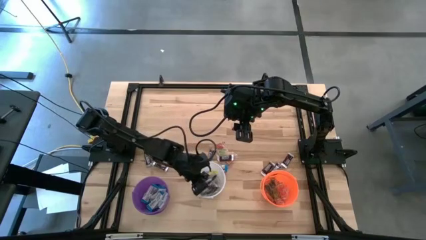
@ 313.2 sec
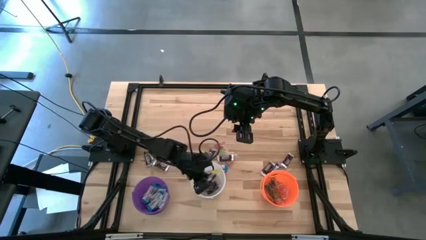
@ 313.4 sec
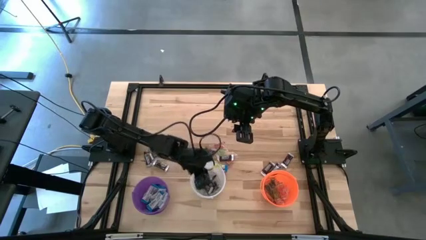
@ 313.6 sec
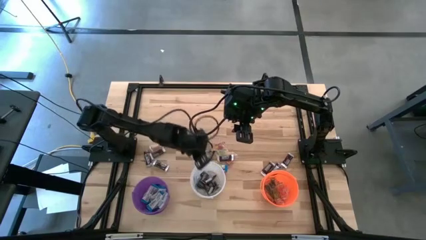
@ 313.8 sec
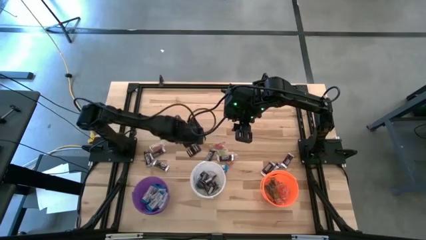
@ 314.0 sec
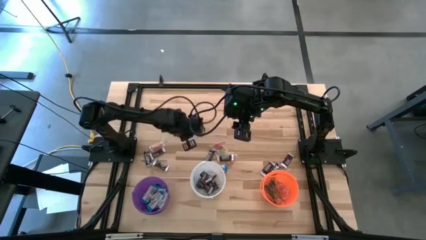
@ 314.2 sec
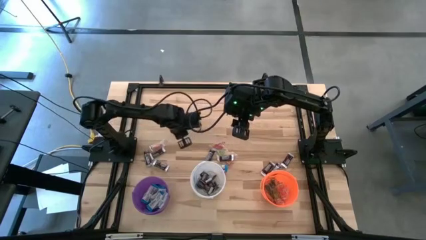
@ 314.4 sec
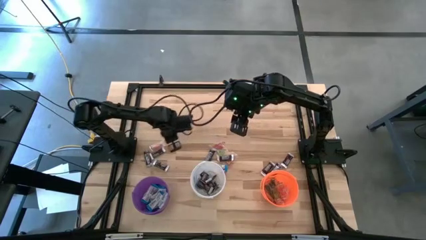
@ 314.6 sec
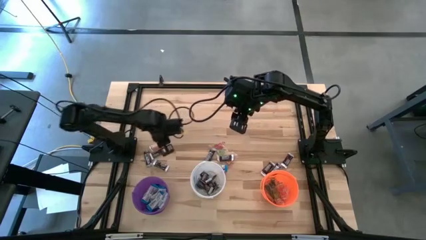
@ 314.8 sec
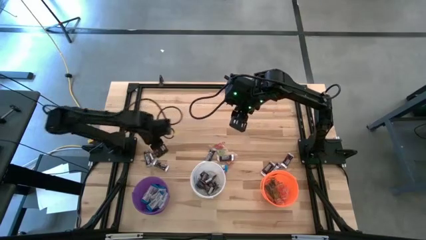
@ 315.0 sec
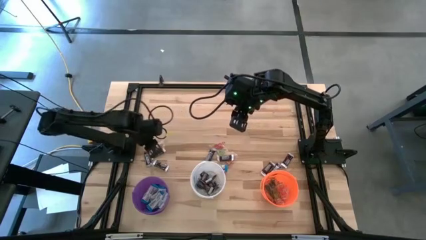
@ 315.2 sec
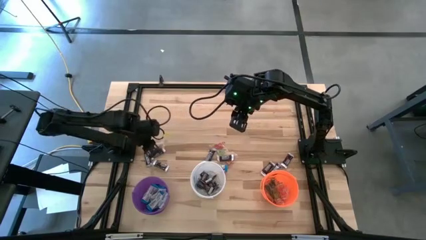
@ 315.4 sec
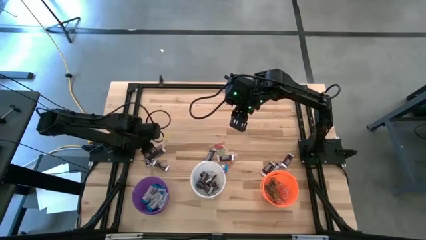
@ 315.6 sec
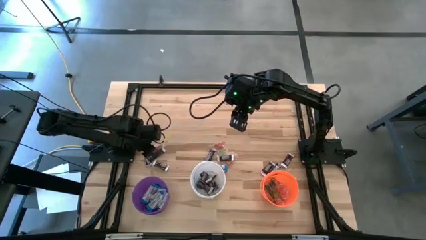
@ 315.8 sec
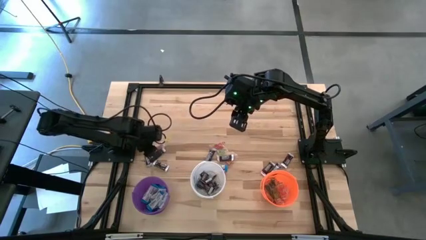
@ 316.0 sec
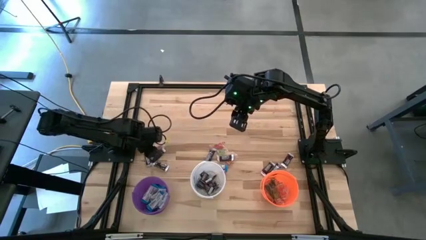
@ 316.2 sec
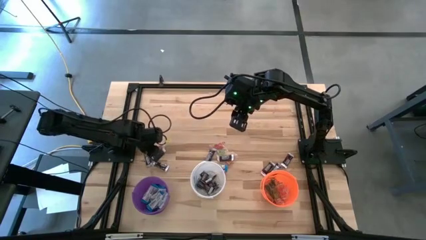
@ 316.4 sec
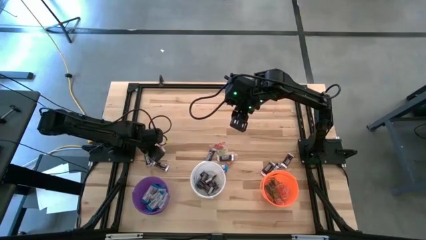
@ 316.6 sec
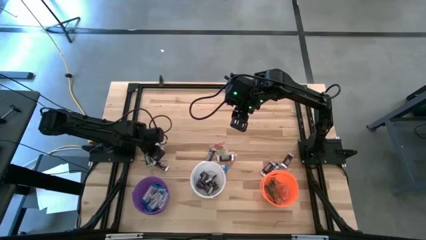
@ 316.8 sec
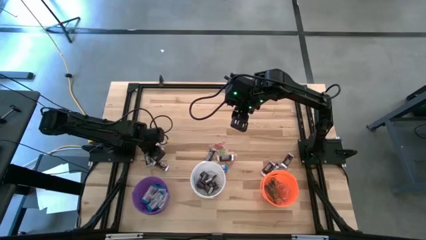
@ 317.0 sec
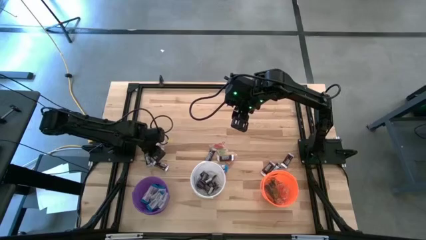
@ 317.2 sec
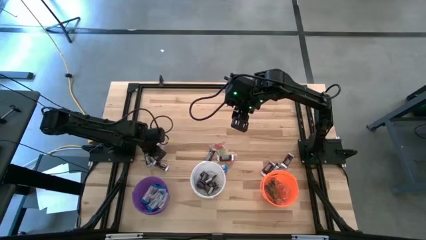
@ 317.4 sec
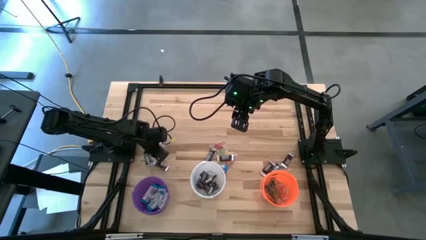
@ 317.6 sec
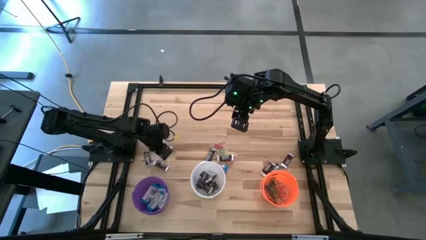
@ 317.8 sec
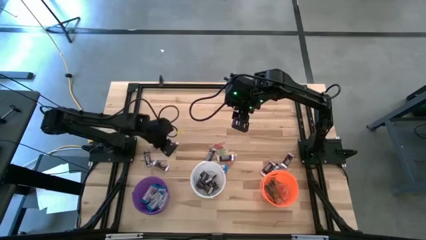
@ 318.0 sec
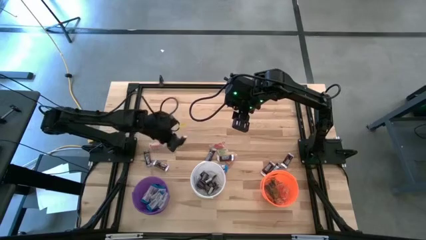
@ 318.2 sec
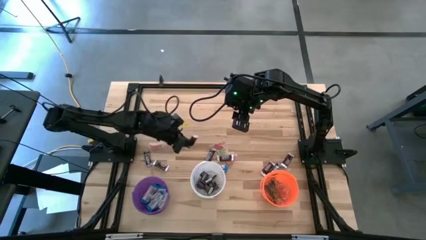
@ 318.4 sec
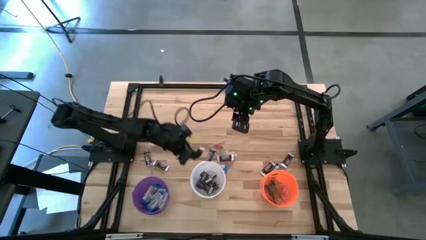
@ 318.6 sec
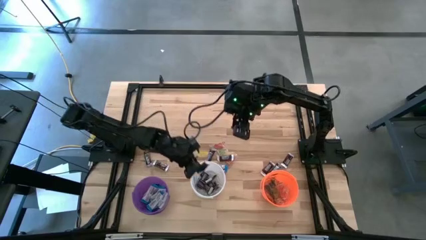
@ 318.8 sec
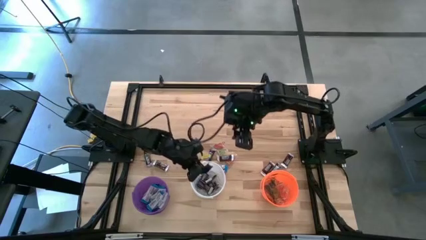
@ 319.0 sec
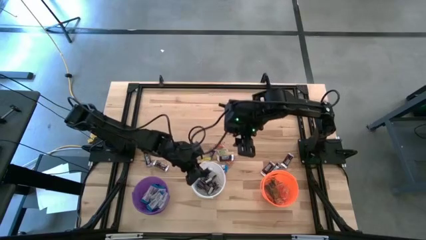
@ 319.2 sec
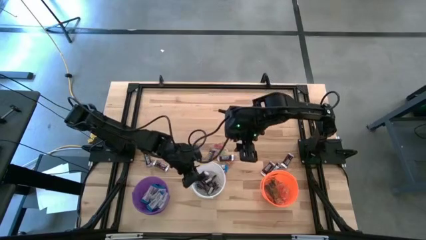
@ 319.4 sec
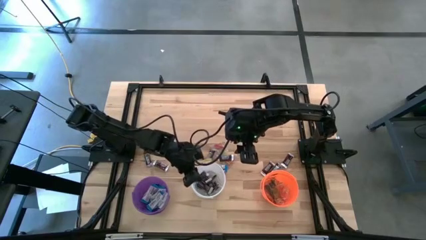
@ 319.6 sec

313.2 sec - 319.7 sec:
Task: Sort candy
Put the brown chocolate into the white bucket

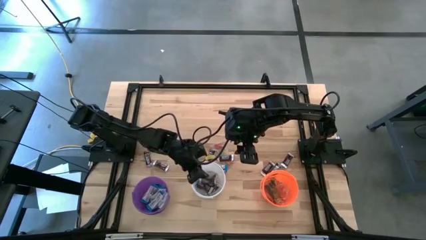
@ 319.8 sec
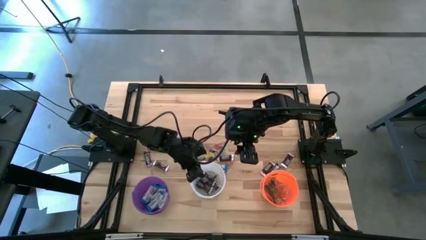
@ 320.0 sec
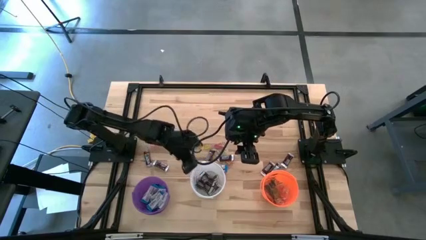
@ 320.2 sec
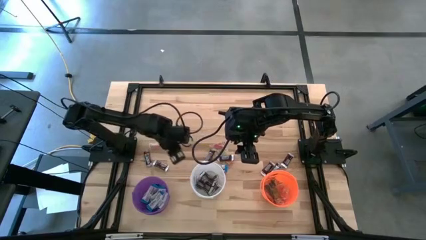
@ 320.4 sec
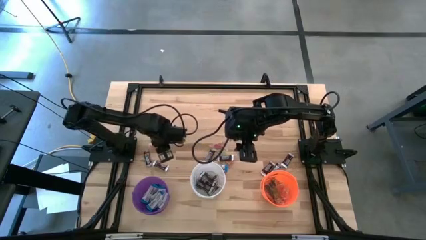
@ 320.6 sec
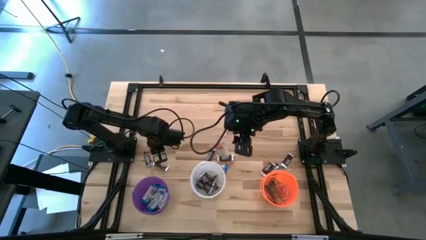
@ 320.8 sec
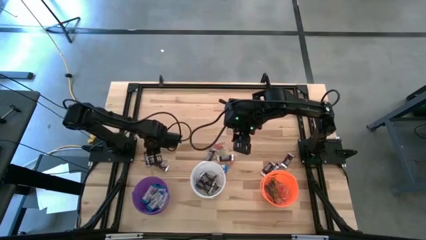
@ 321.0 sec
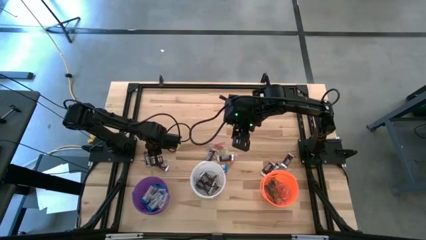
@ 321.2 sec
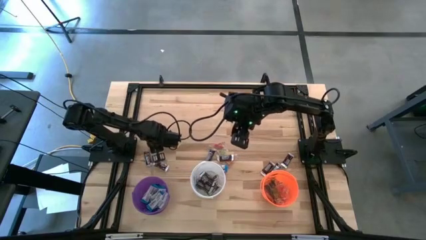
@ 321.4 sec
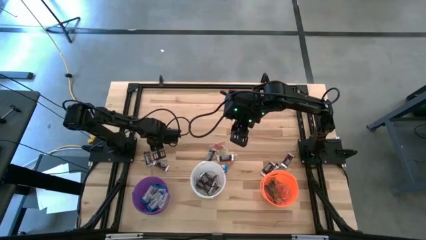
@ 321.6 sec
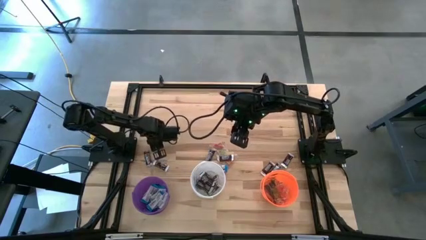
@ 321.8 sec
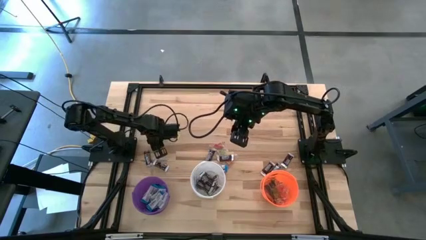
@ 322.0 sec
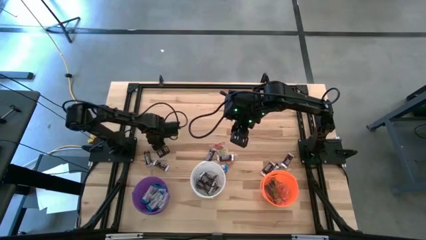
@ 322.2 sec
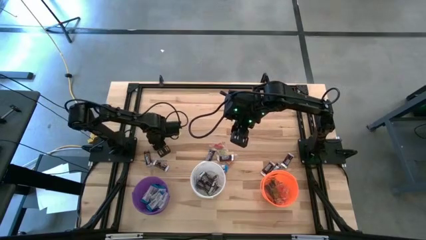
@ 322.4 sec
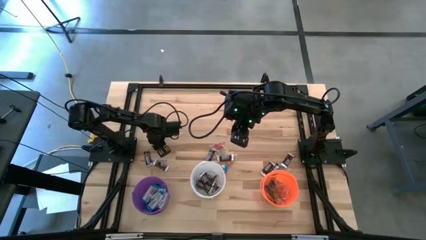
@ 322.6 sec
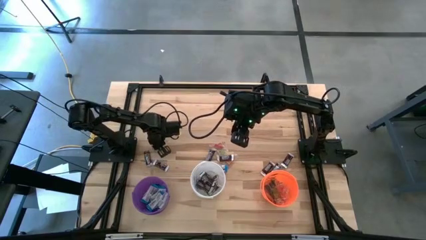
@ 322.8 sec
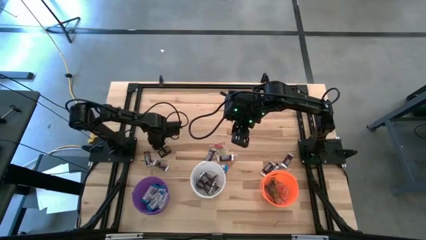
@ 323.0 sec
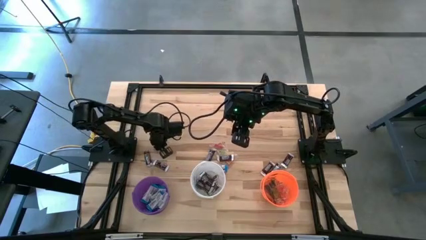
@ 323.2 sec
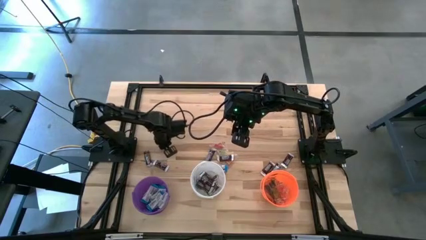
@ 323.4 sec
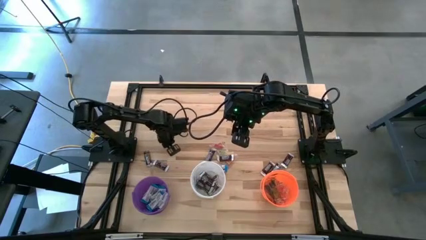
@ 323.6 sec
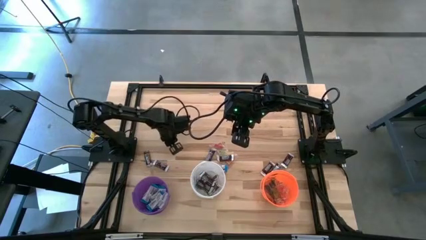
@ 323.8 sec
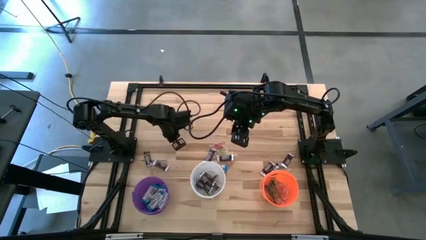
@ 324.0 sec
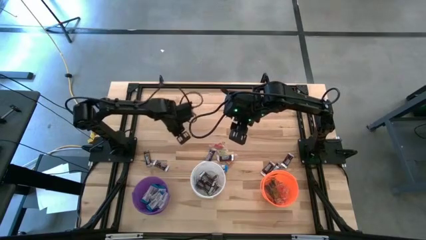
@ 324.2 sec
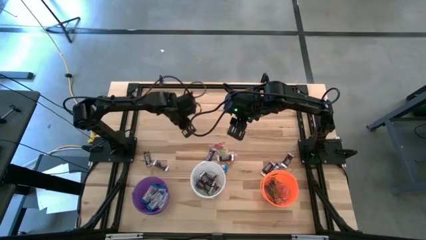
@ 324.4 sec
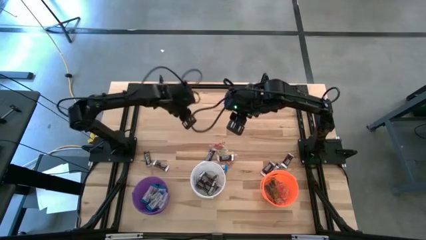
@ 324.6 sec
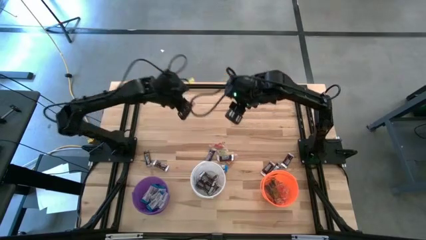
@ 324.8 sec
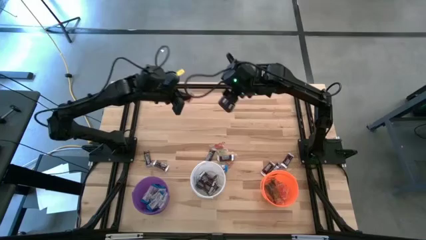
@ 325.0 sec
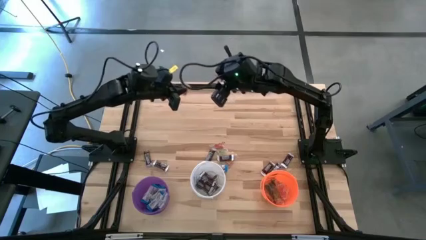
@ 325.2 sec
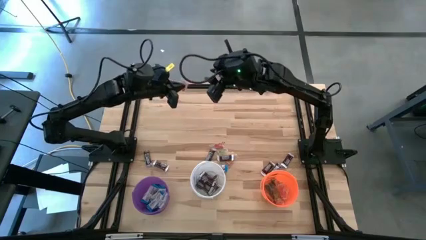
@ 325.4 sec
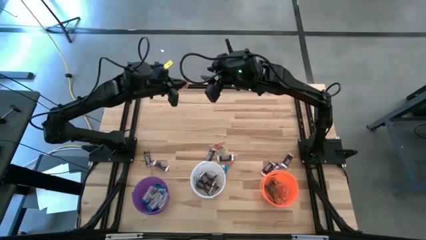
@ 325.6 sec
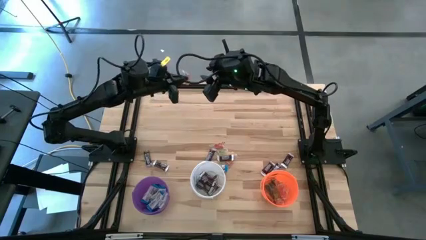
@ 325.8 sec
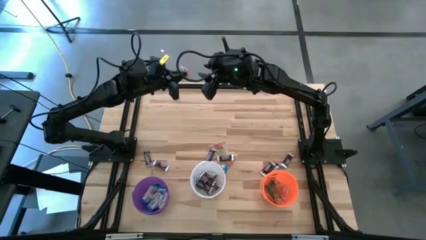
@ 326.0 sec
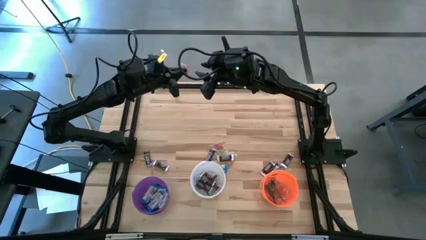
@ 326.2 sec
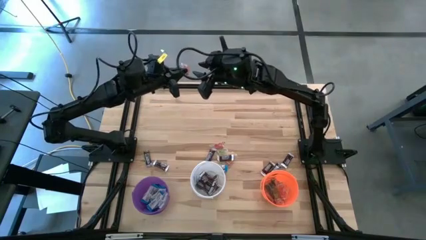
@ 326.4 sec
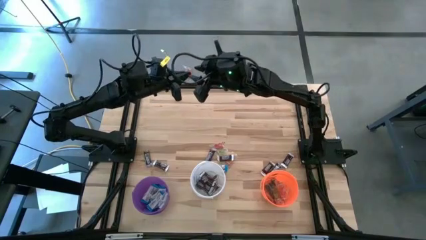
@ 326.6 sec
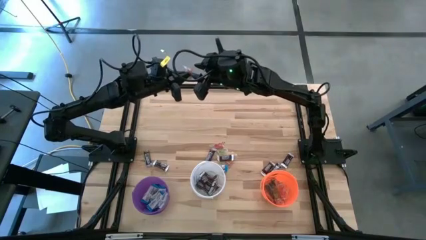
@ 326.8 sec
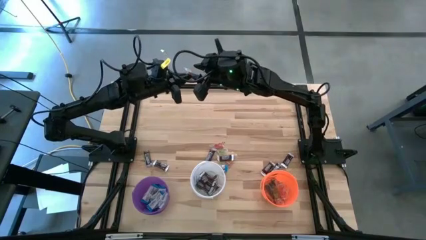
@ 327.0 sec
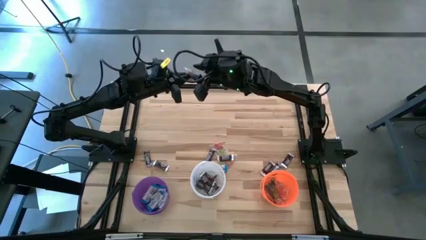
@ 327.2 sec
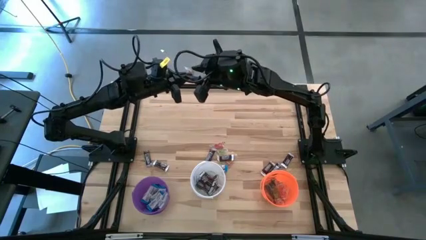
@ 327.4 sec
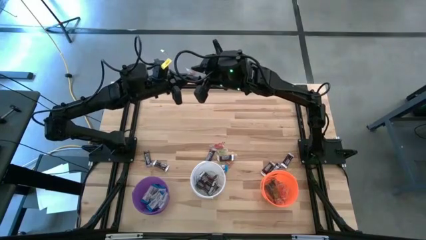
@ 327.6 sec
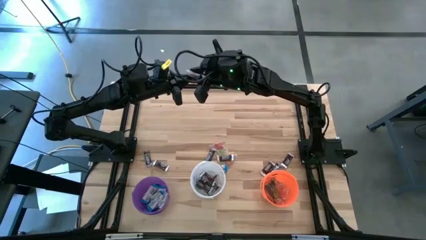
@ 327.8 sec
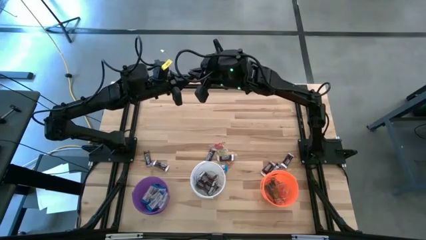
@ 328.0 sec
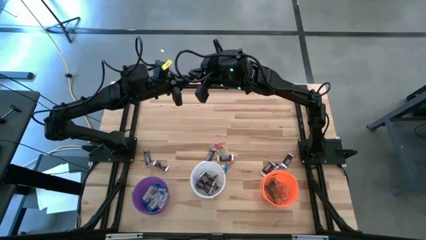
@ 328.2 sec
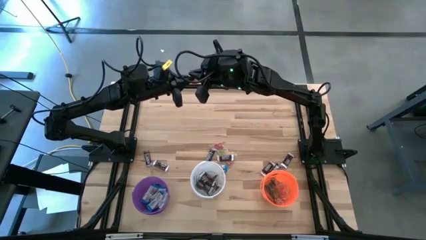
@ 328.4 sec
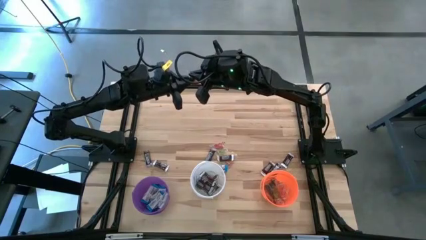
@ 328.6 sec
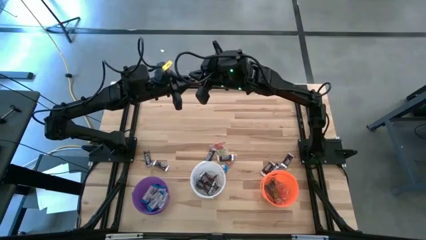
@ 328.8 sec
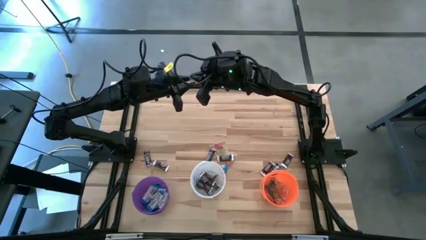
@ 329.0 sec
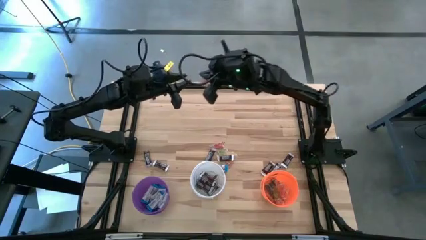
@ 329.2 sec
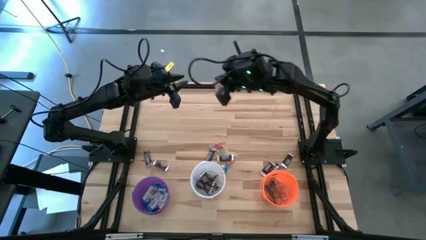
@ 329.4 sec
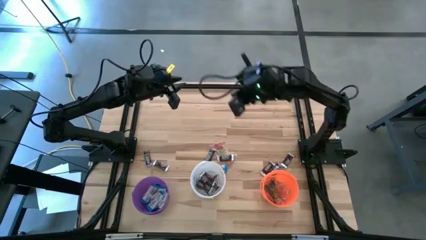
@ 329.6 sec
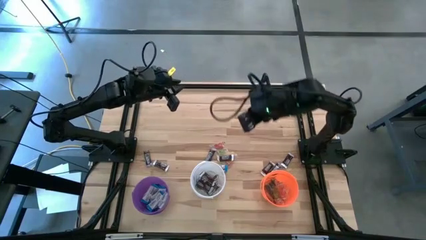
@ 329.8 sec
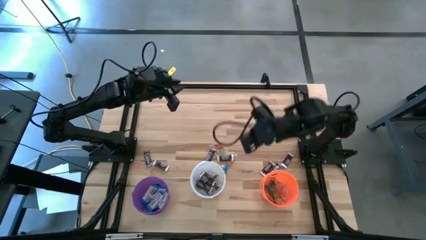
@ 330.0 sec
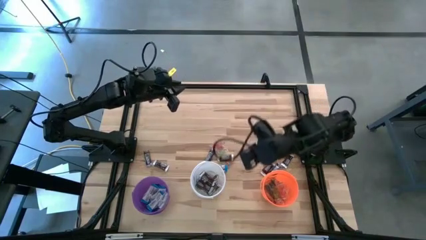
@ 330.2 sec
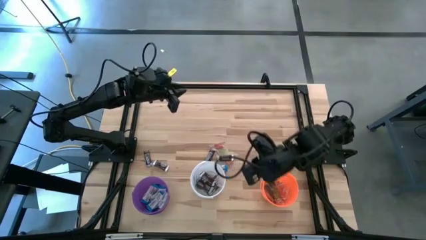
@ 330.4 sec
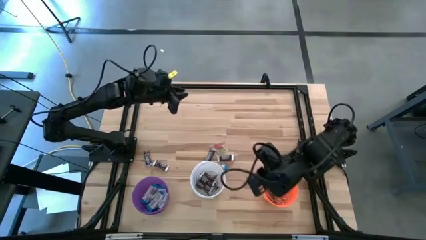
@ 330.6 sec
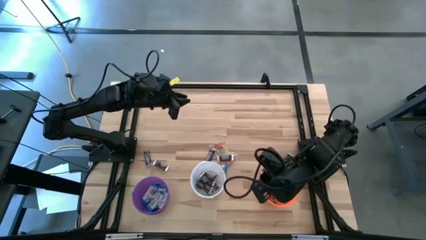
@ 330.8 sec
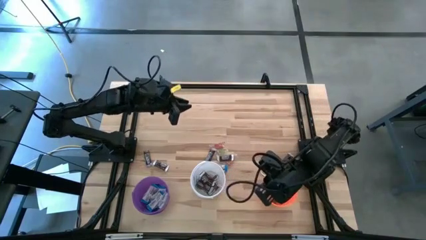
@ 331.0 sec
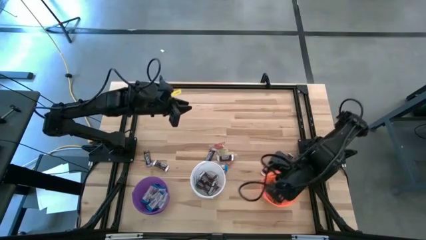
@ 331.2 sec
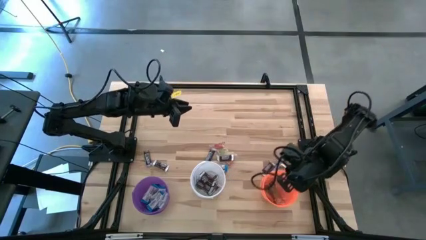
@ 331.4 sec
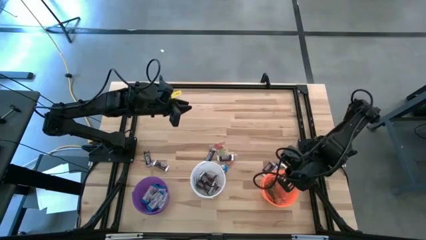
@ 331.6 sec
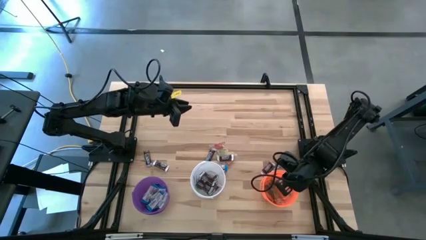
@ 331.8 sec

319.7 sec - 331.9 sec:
Put the orange gummy into the orange bucket
